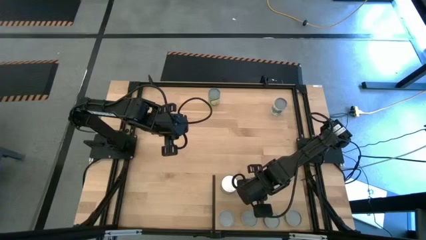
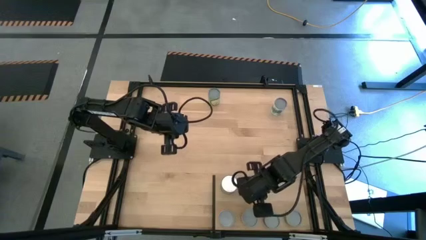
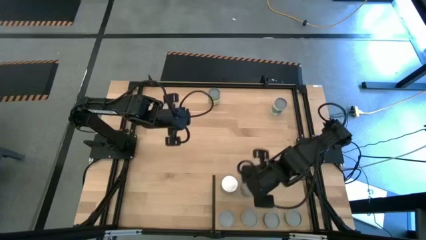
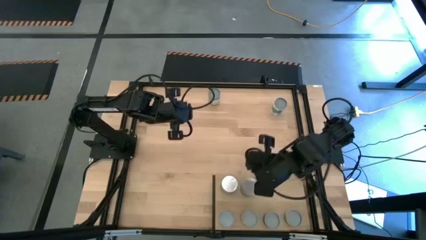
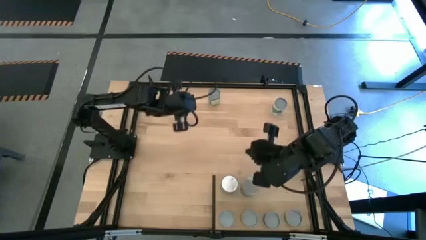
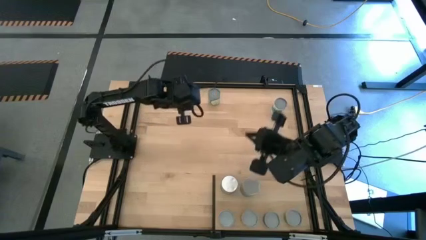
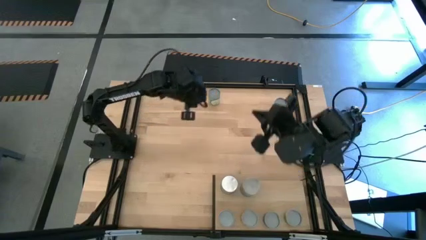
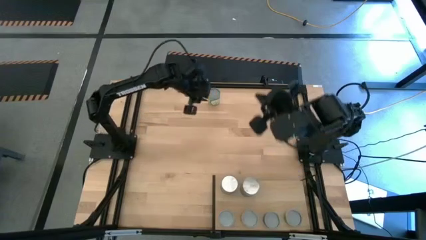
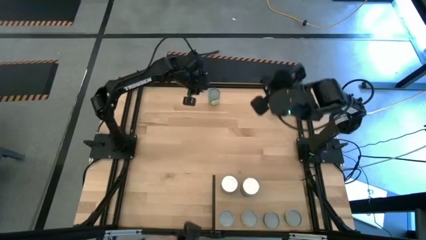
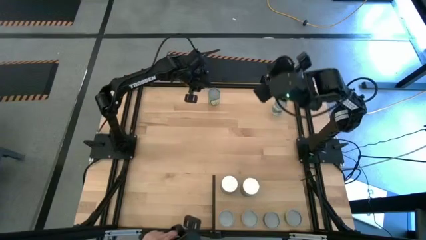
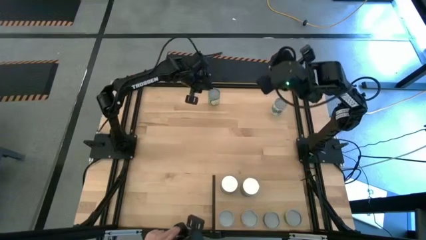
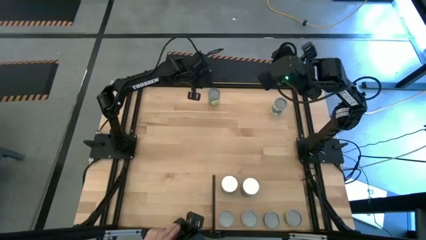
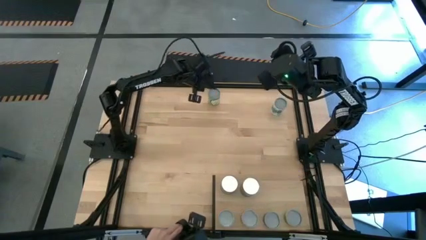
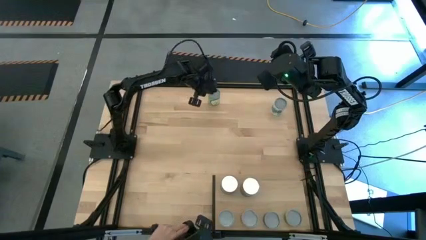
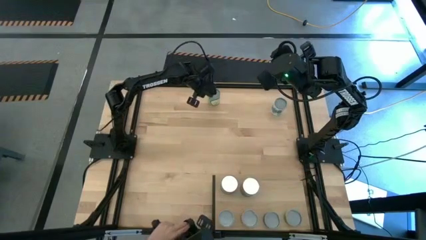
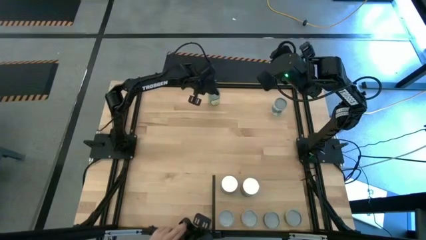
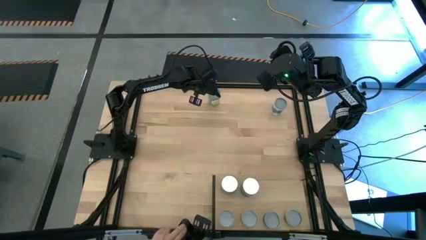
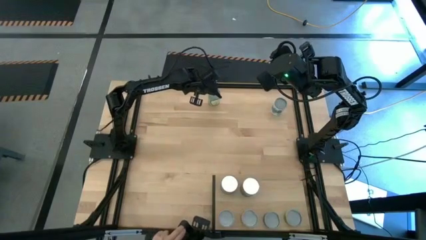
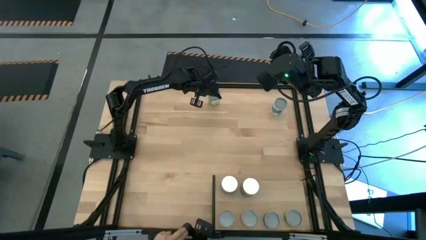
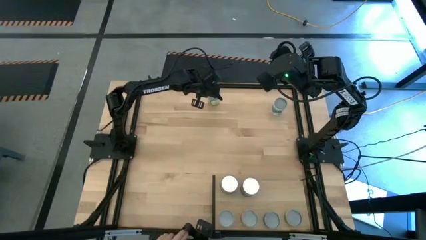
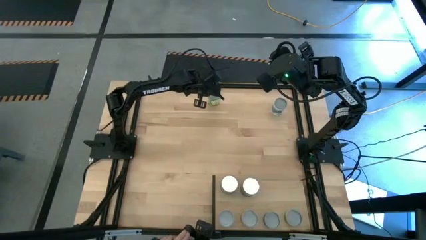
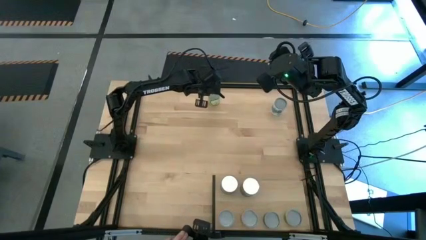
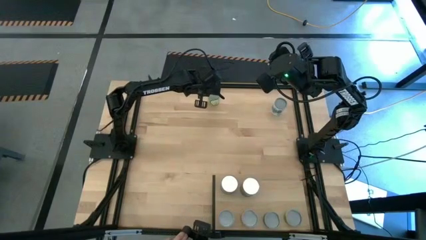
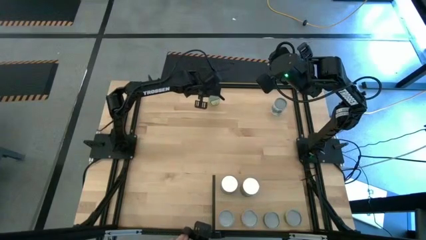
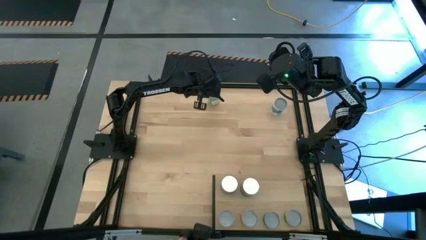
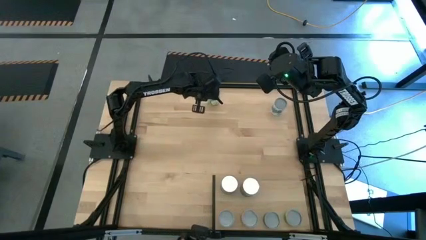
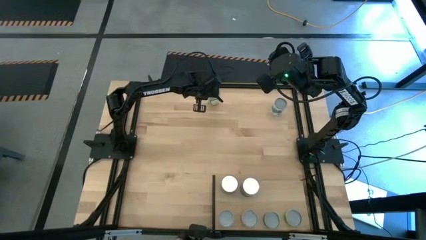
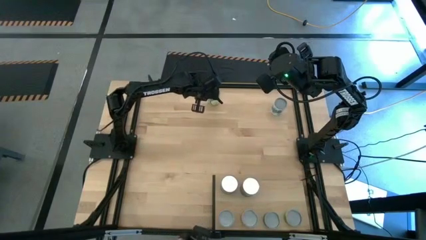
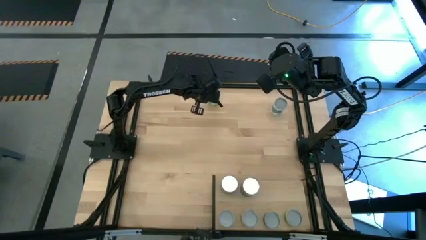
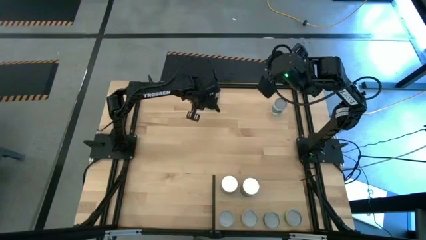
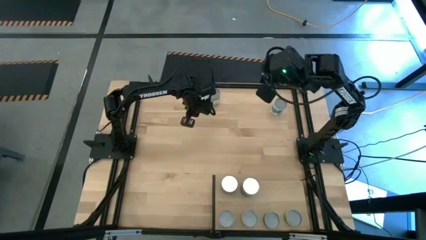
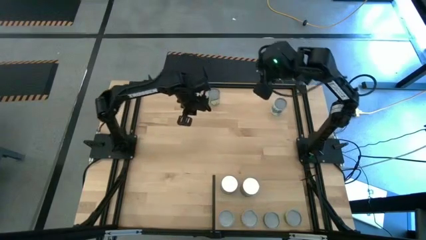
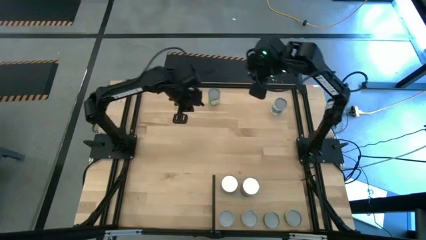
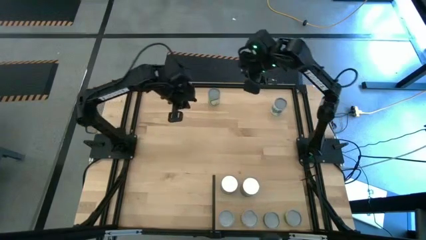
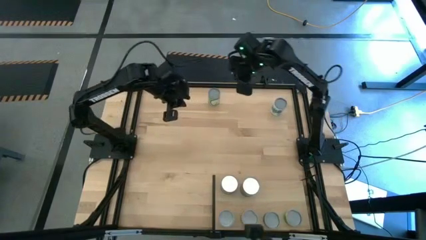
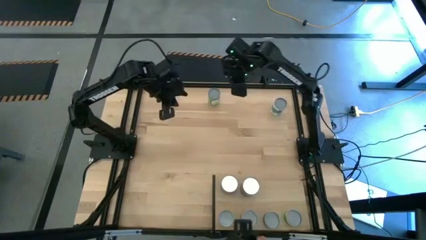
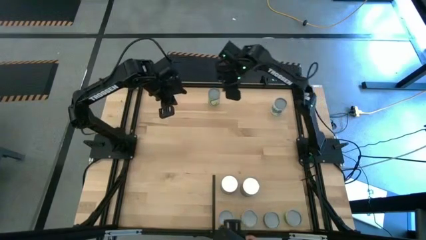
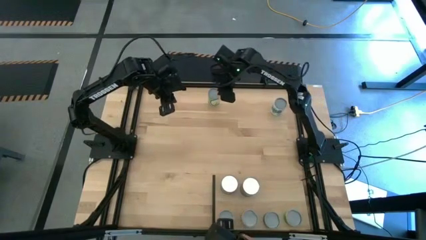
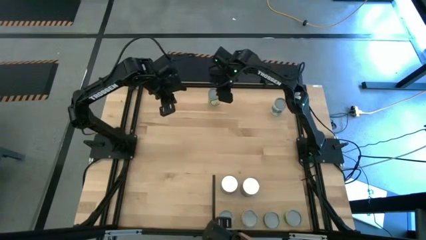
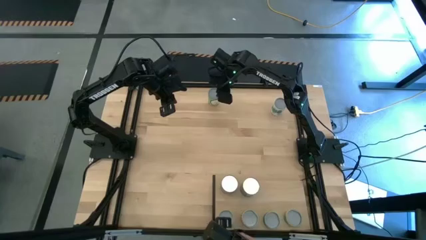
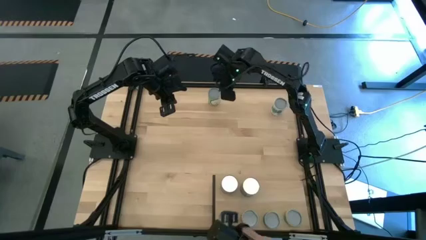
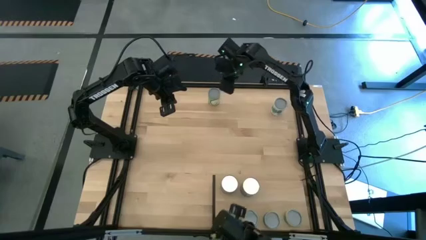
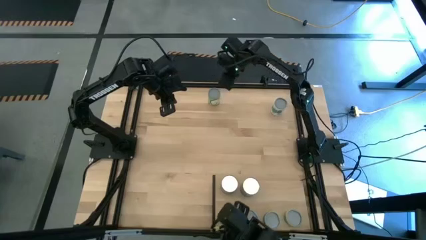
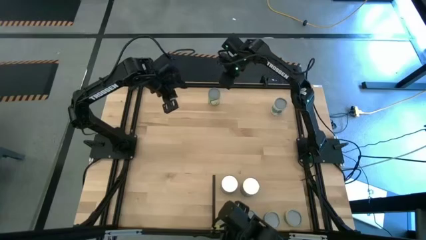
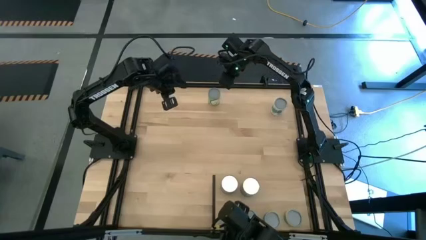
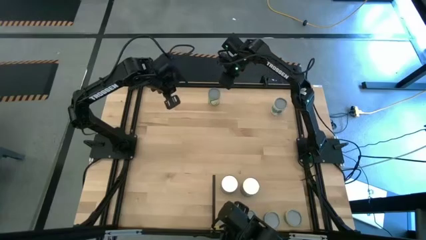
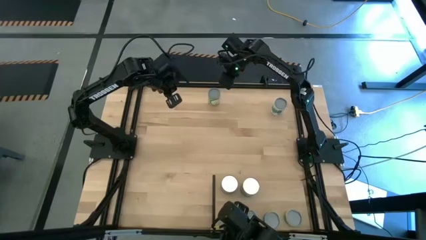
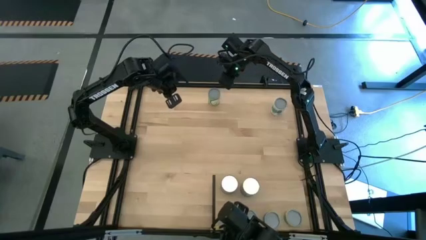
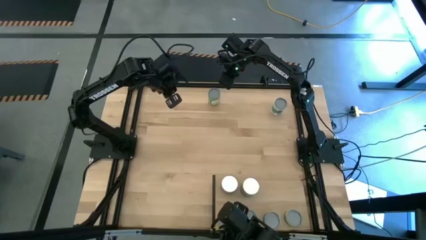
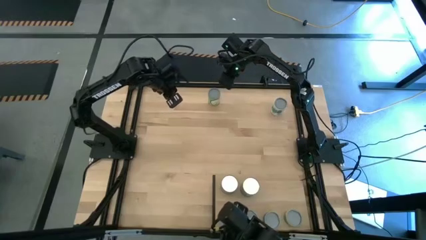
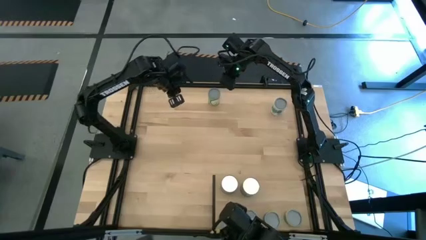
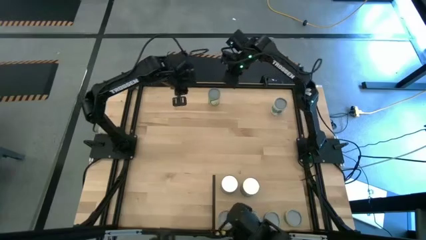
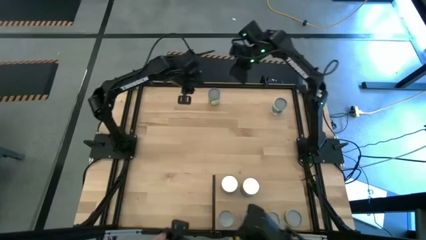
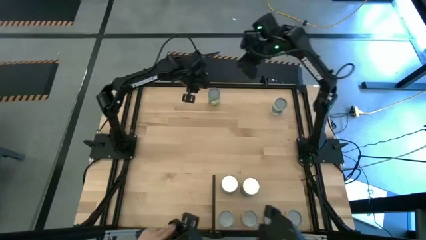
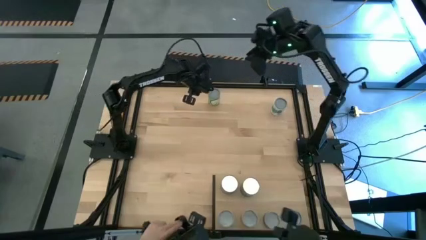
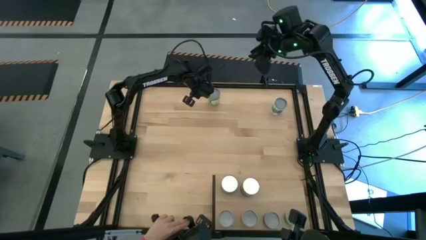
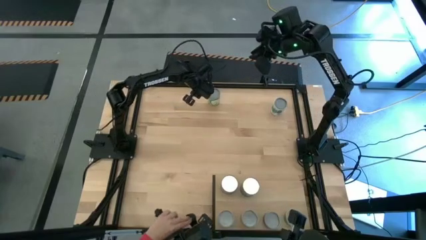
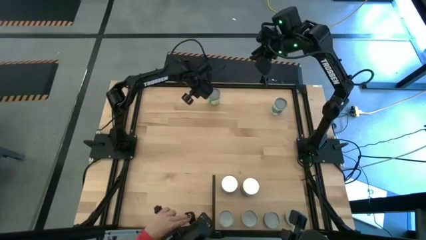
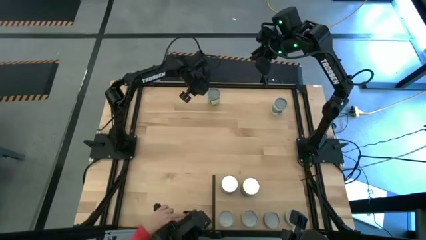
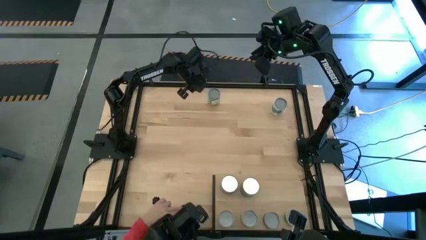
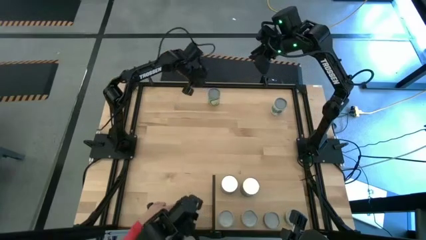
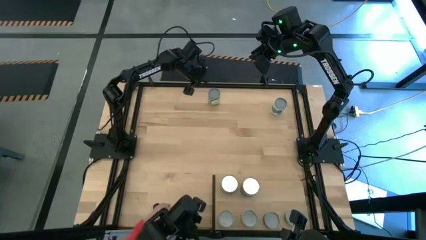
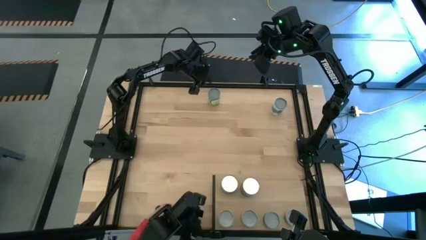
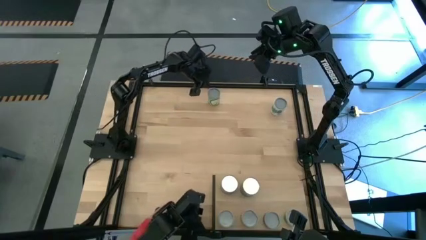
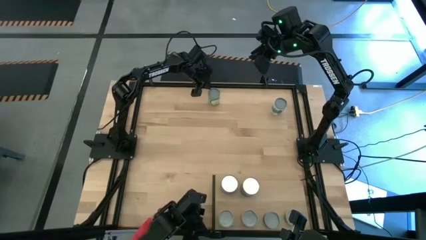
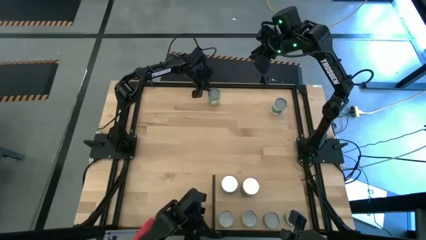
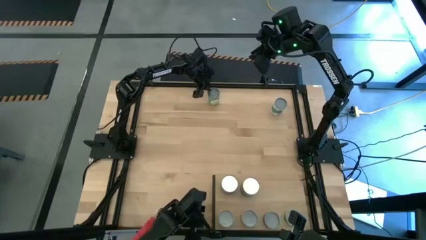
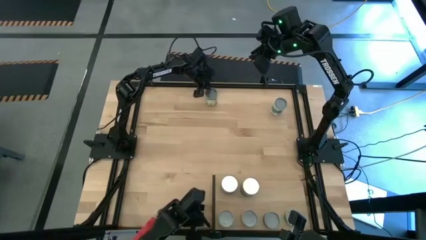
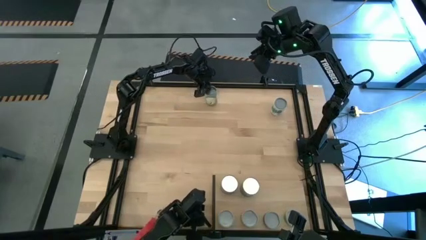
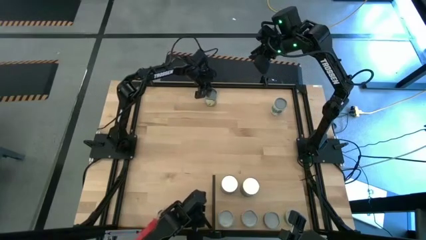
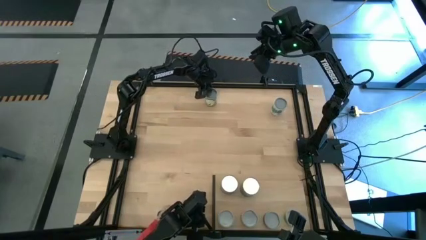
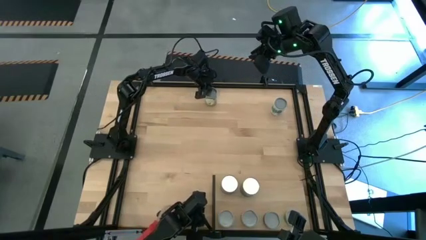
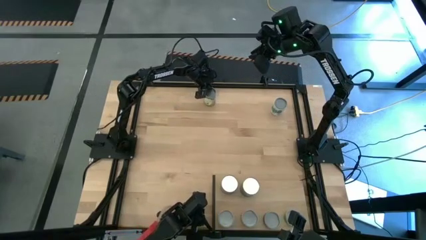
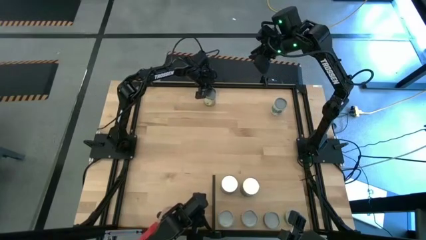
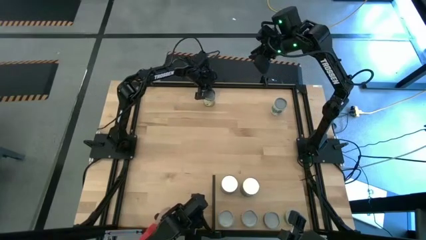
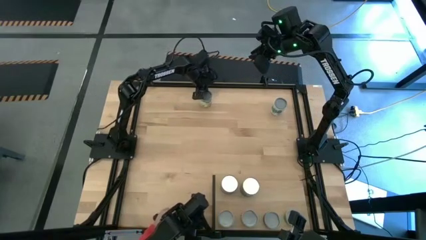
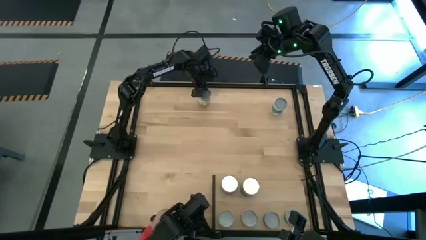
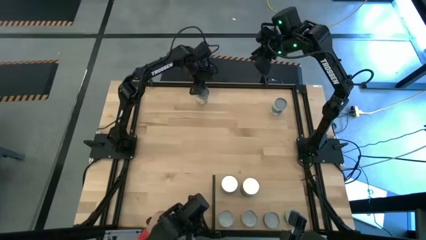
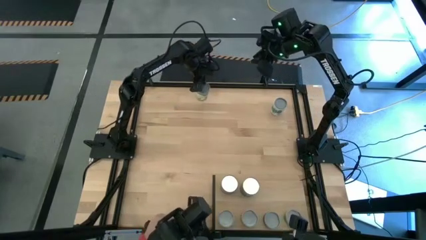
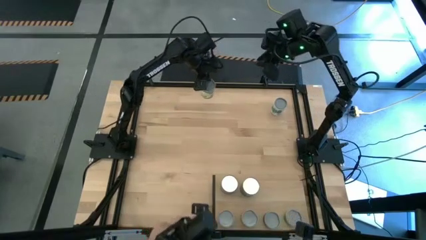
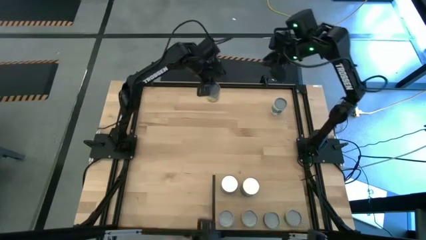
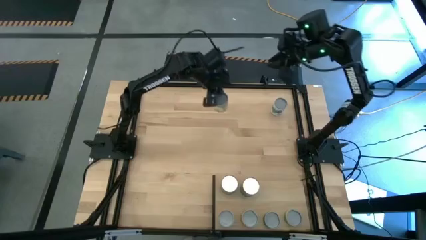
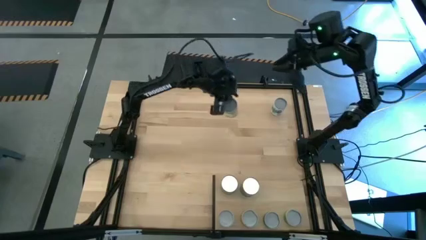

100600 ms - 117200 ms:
Task: Pick and place cans onto a shelf
Put the canned chicken soup on the shelf
